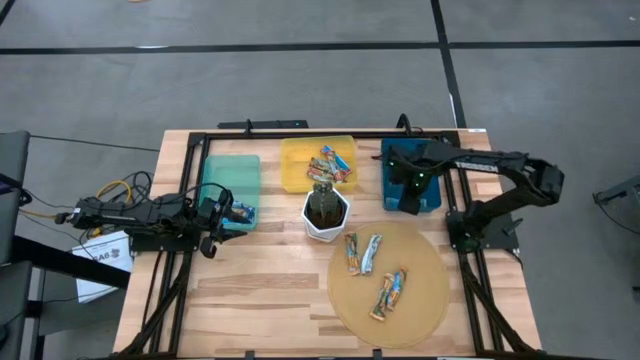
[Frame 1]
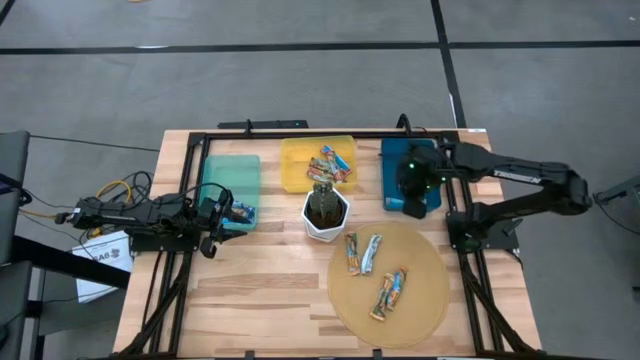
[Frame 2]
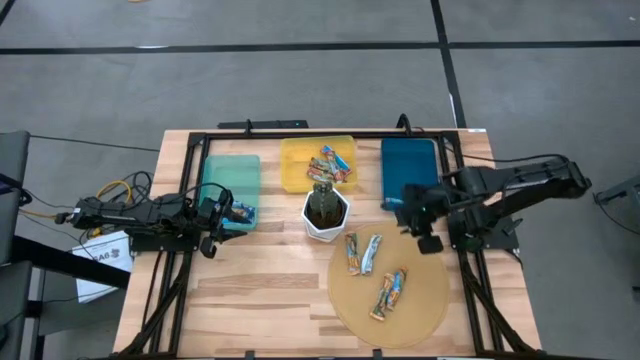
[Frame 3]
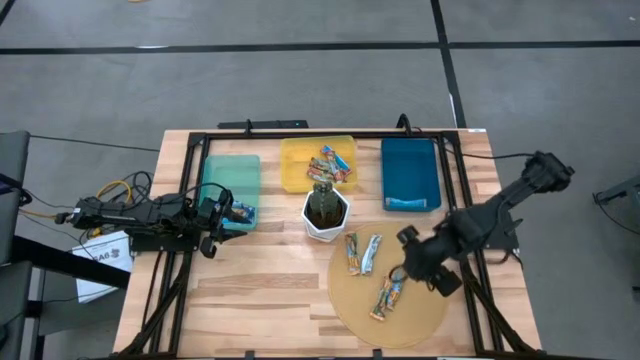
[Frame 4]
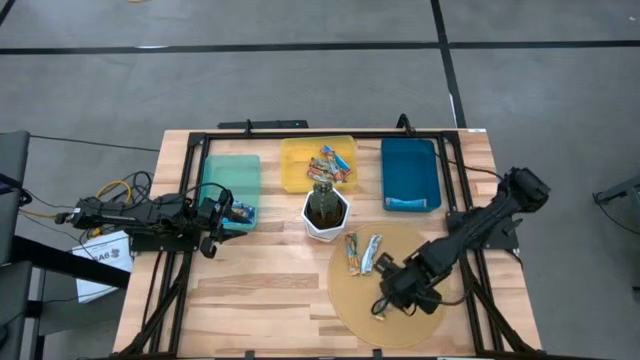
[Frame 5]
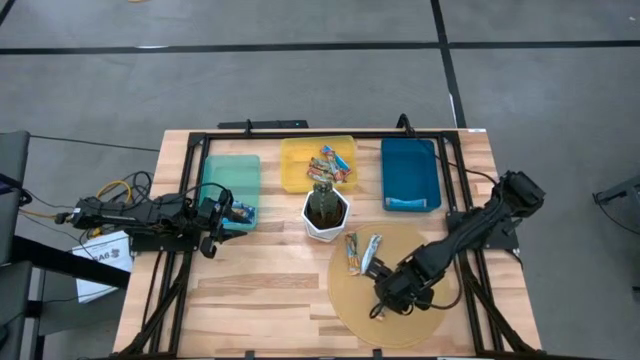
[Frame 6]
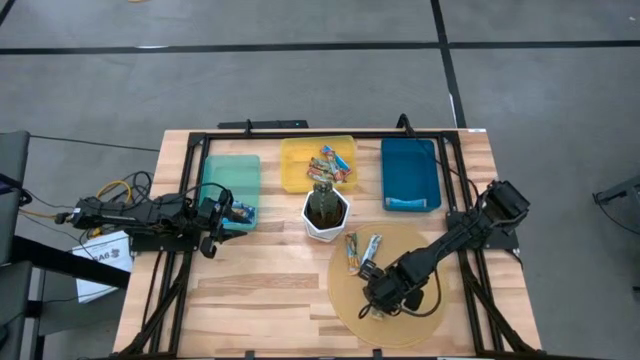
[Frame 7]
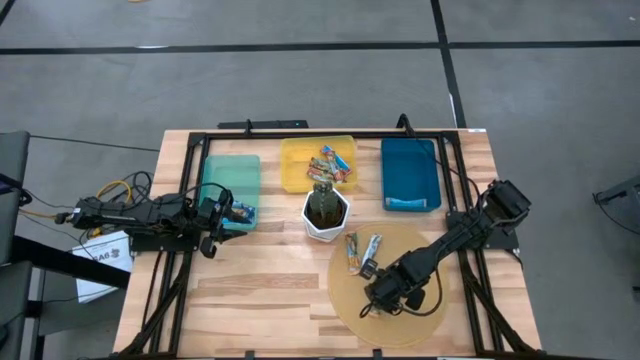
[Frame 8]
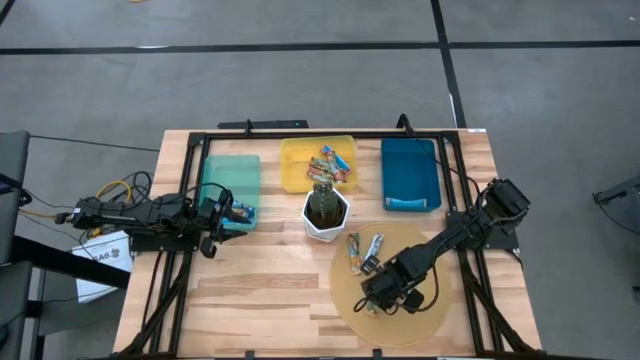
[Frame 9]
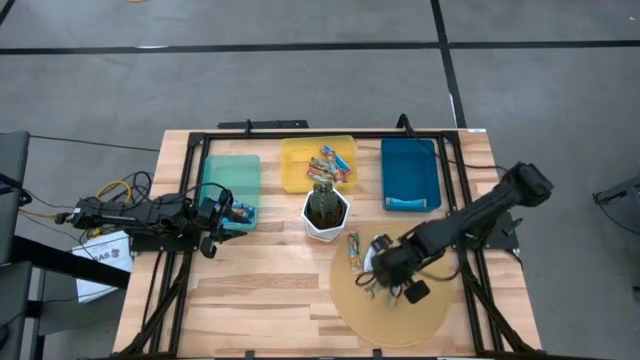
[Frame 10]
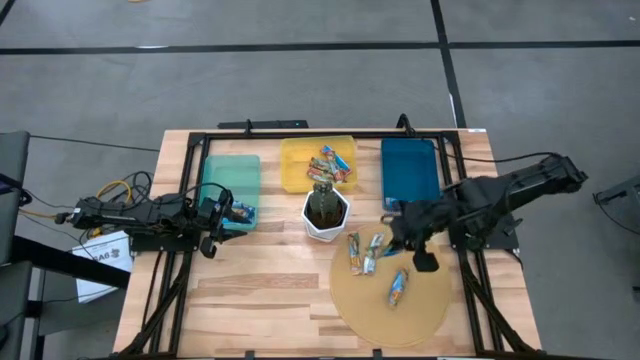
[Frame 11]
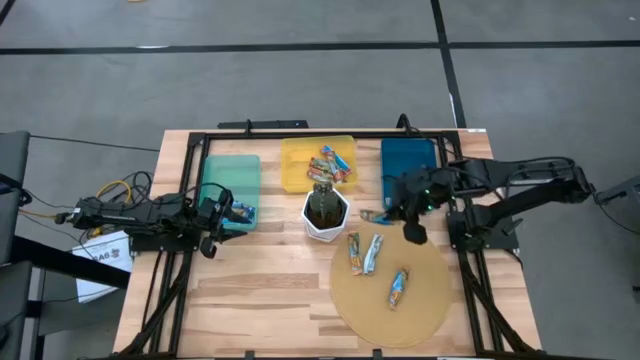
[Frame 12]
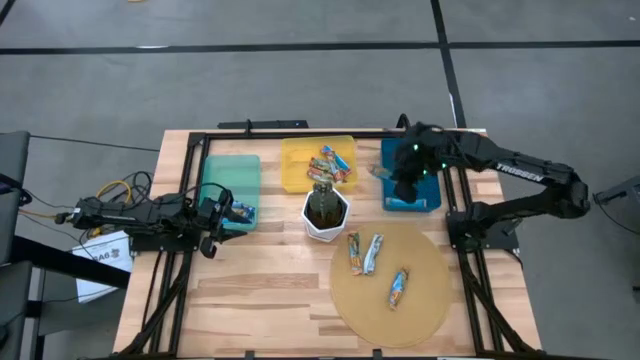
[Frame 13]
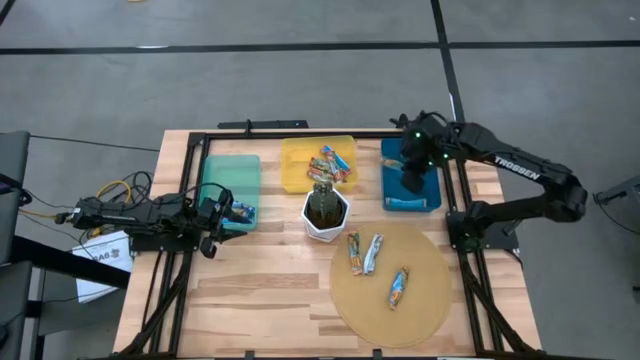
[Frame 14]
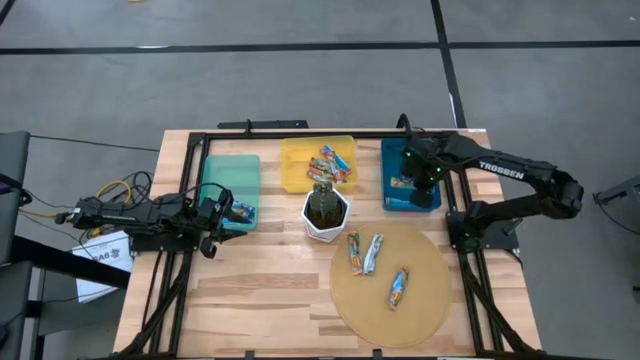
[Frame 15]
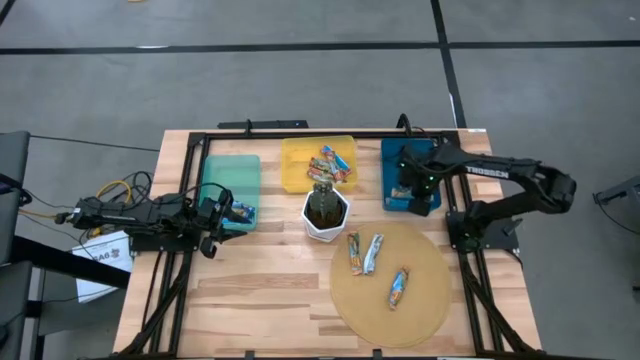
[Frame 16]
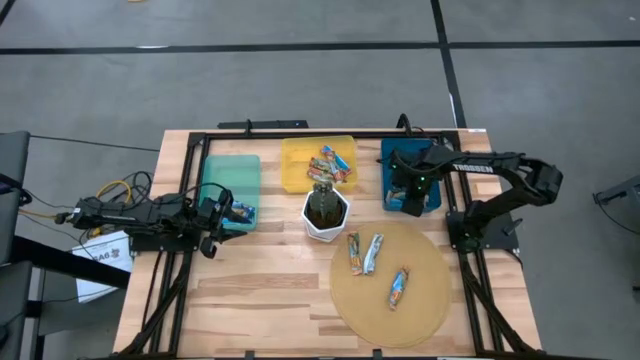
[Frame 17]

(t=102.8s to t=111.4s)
Task: Pick and place Granola Bars by type
Put the orange granola bar into the blue bin

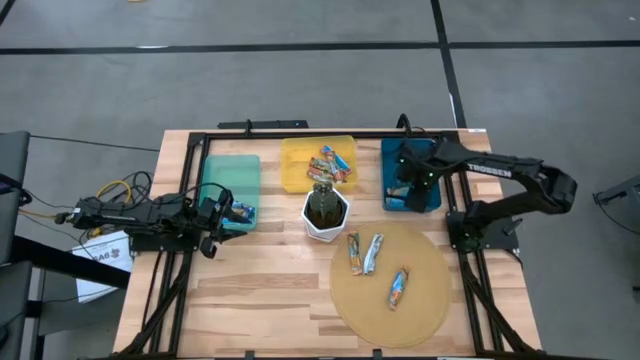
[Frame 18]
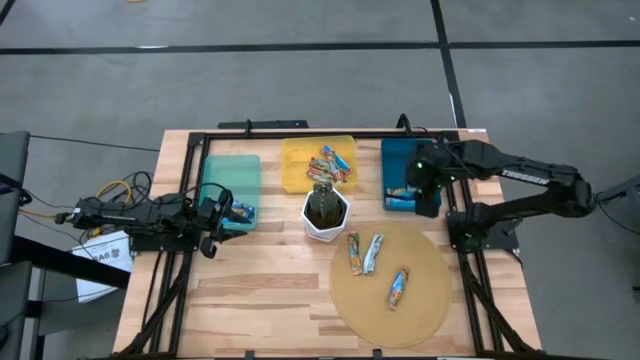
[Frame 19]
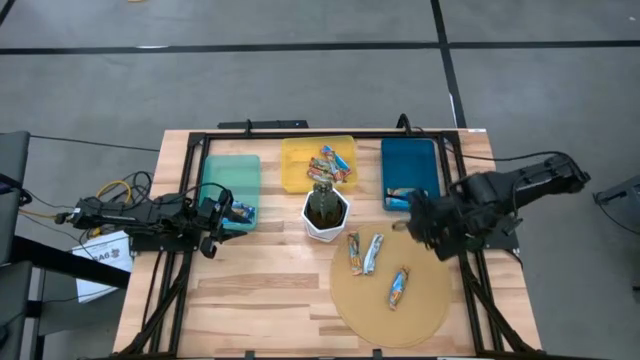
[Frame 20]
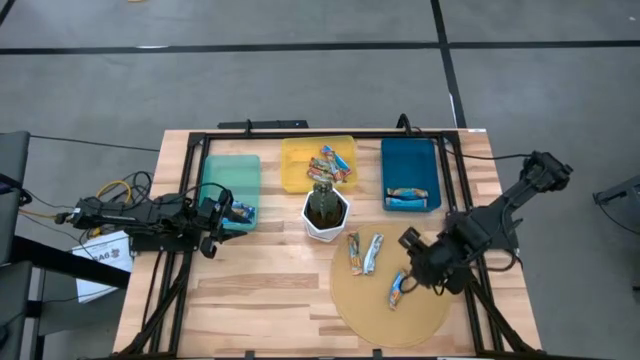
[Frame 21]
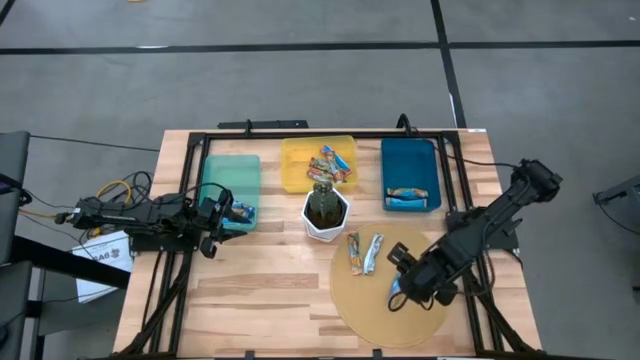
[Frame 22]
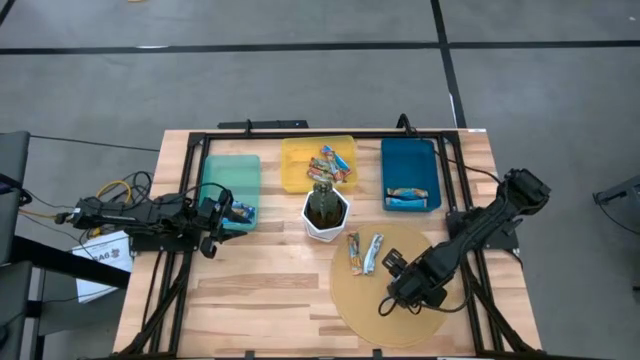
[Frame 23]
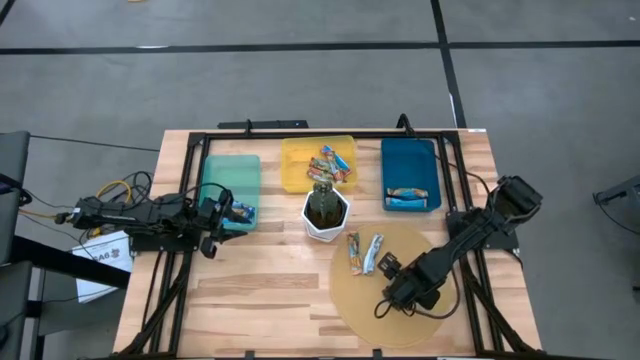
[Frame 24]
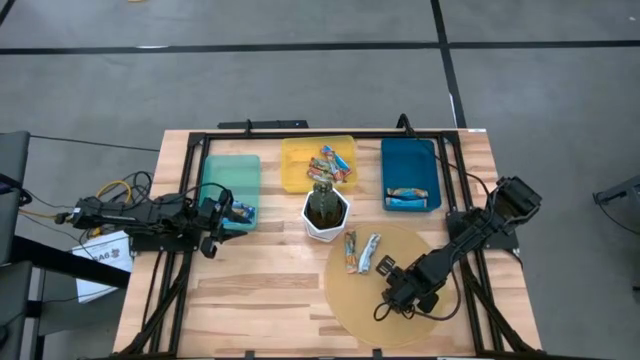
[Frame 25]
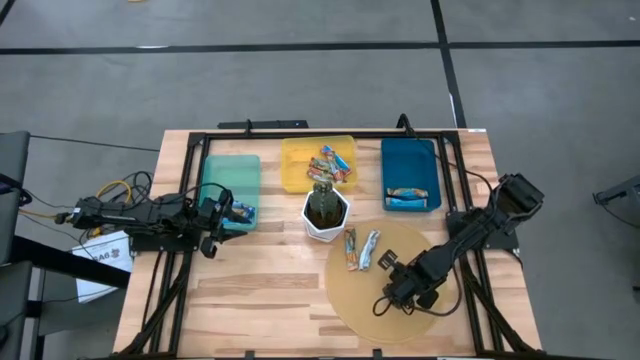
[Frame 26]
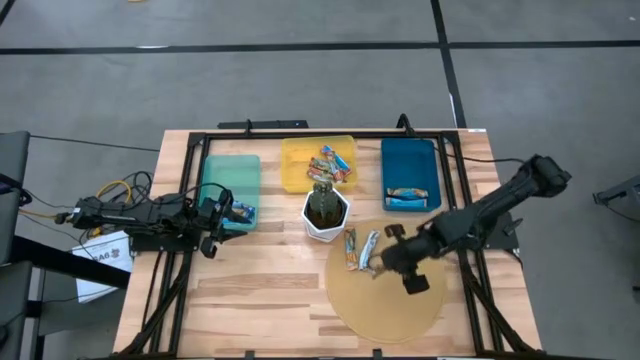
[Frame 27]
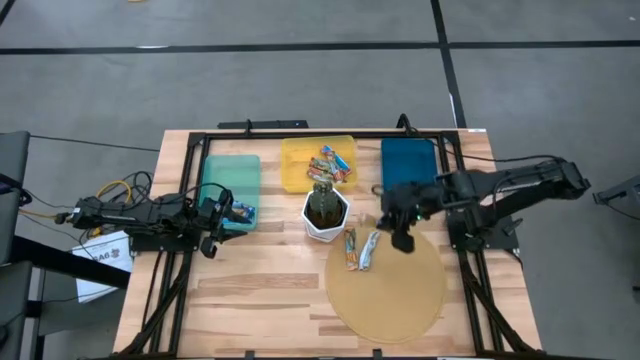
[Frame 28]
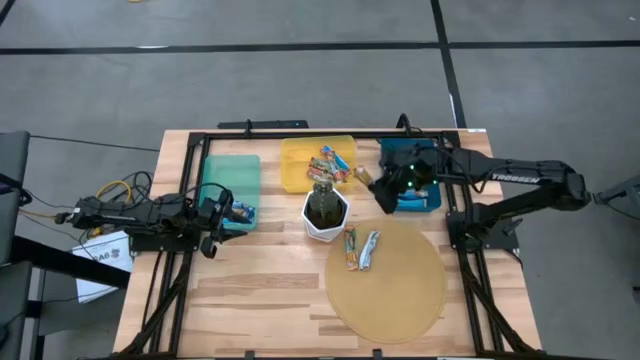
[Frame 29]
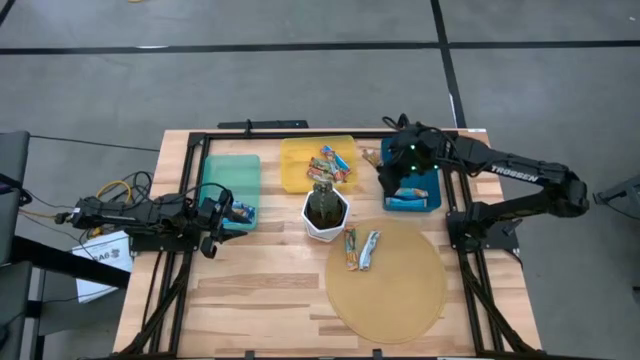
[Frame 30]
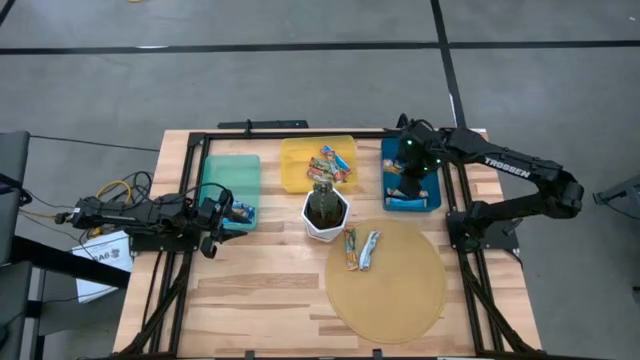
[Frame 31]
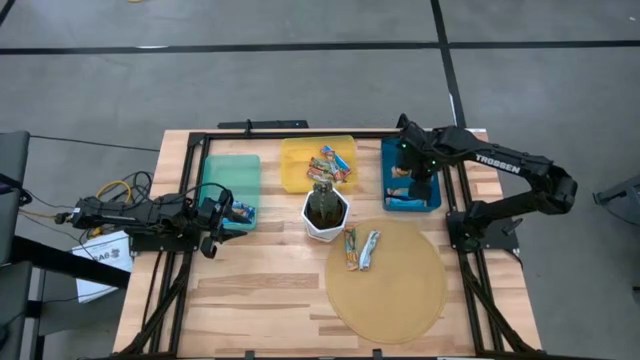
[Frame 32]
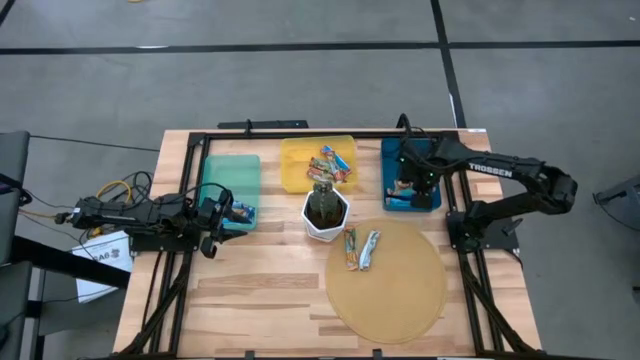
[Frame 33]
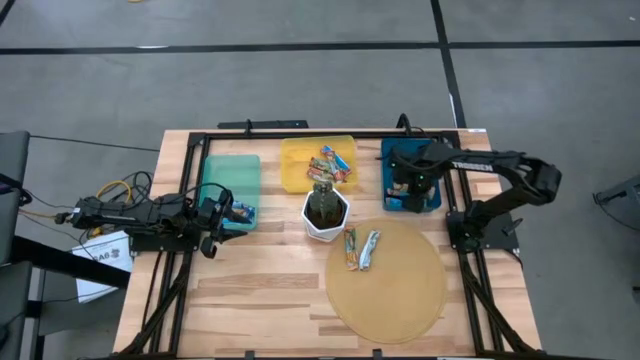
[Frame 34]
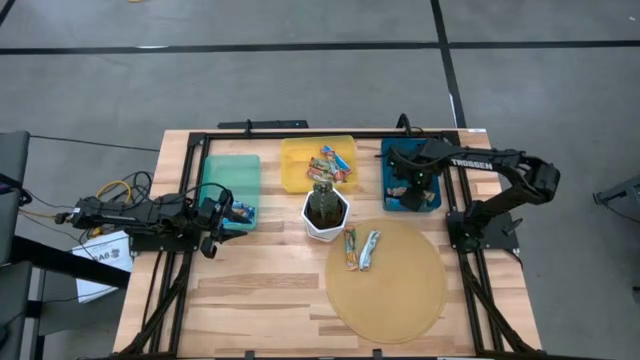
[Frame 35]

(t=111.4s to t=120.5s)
Put the orange granola bar into the blue bin
